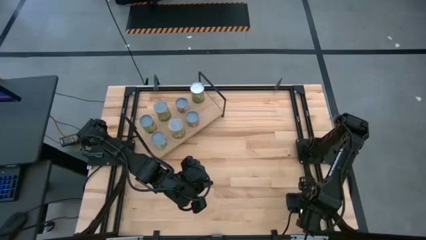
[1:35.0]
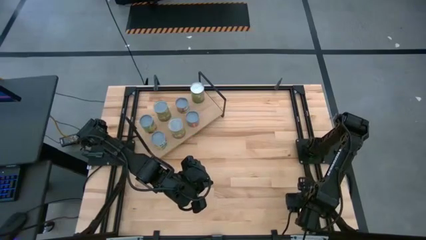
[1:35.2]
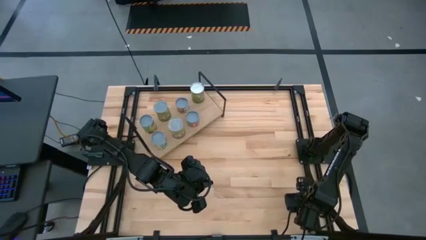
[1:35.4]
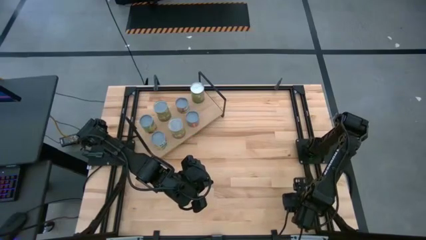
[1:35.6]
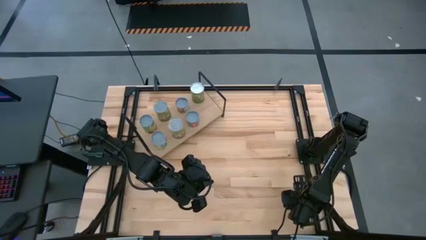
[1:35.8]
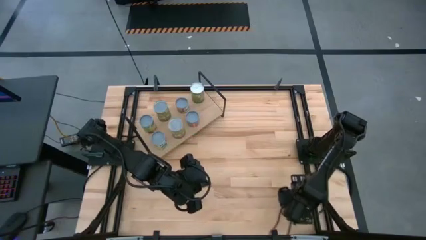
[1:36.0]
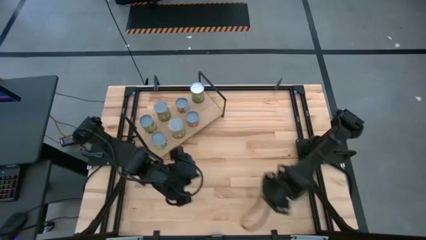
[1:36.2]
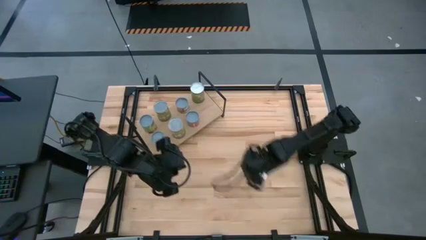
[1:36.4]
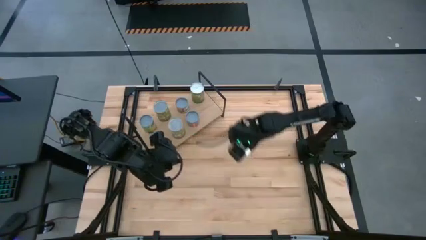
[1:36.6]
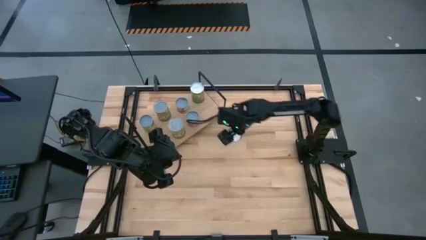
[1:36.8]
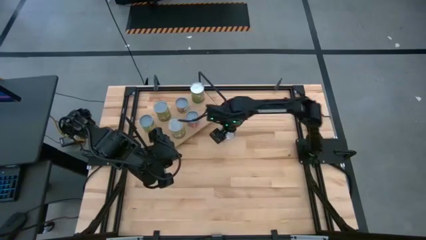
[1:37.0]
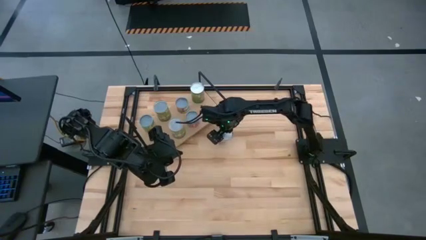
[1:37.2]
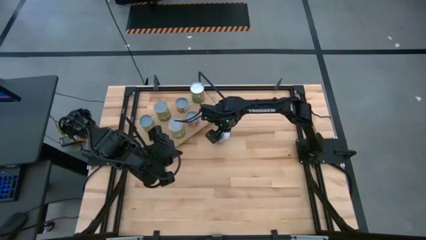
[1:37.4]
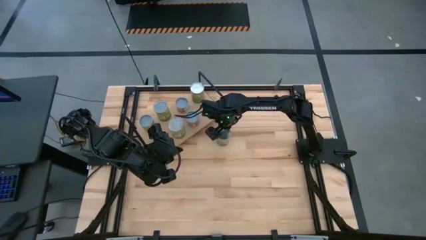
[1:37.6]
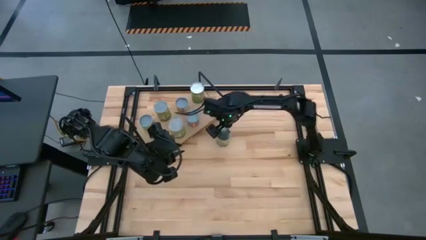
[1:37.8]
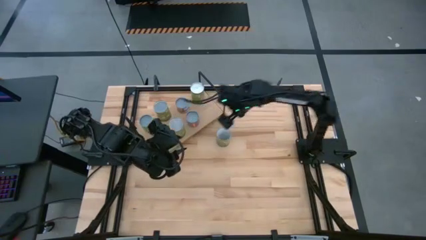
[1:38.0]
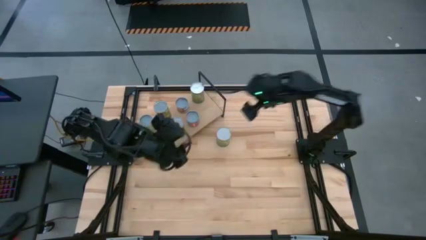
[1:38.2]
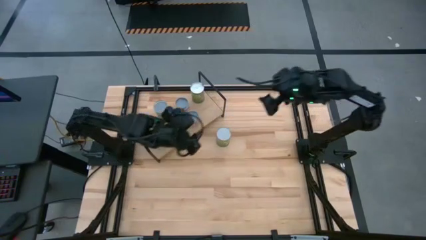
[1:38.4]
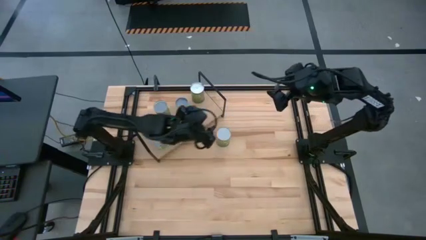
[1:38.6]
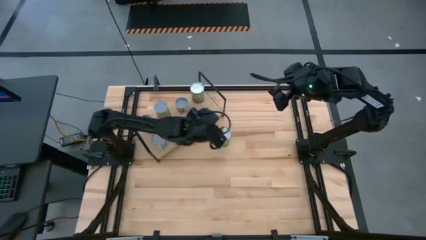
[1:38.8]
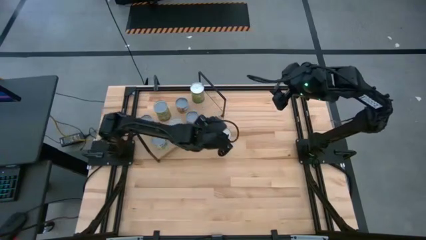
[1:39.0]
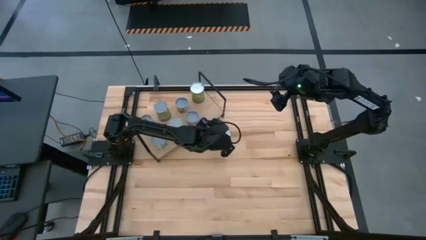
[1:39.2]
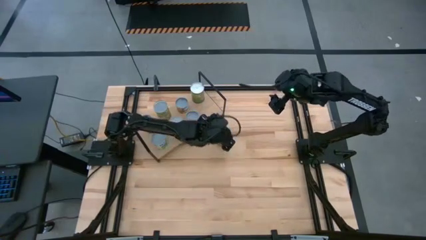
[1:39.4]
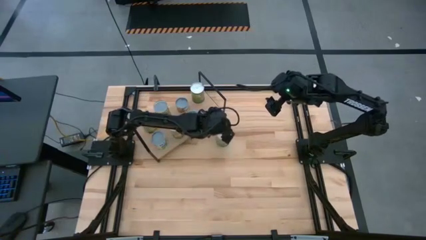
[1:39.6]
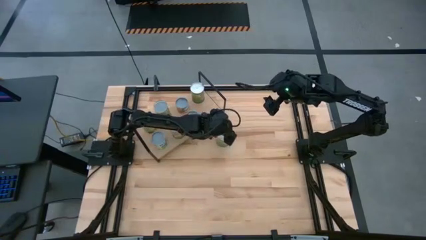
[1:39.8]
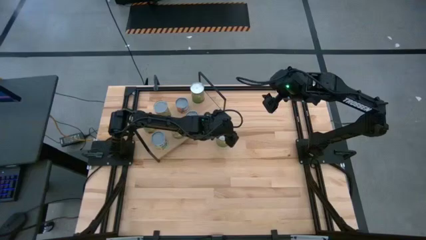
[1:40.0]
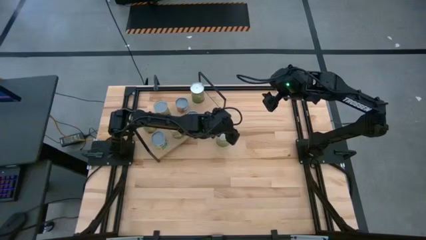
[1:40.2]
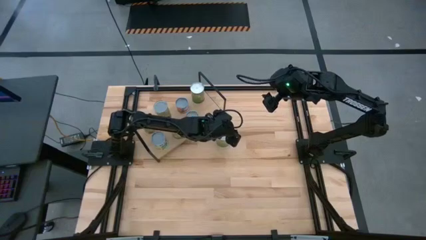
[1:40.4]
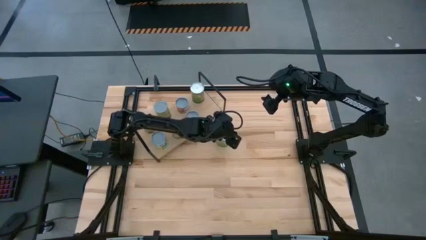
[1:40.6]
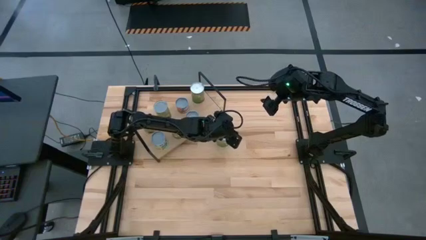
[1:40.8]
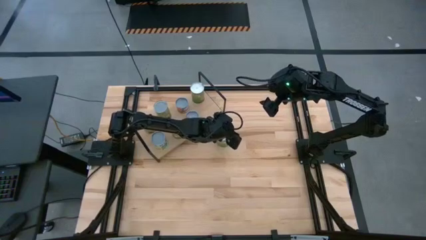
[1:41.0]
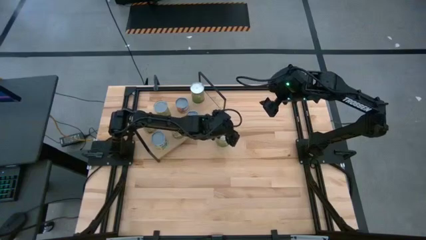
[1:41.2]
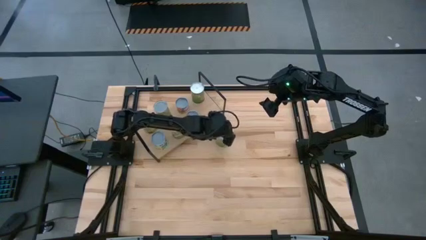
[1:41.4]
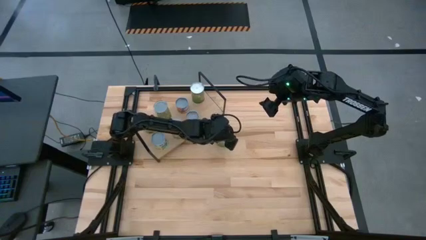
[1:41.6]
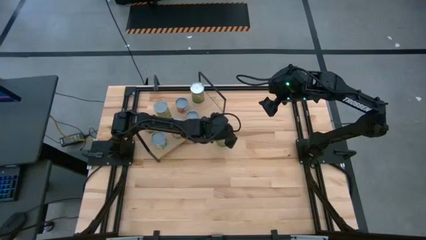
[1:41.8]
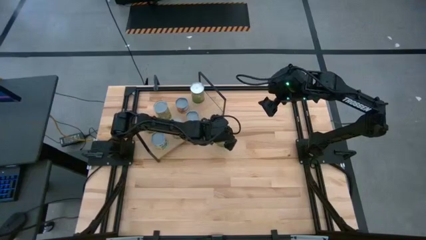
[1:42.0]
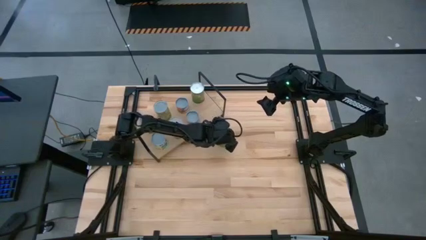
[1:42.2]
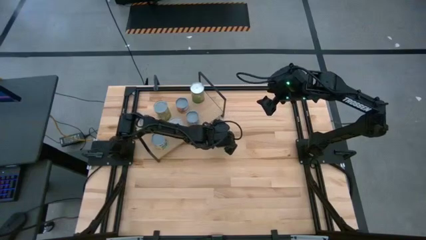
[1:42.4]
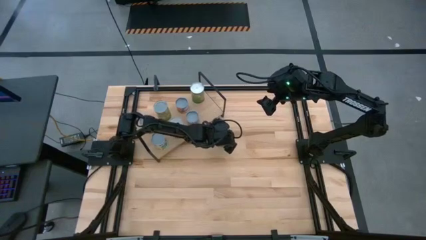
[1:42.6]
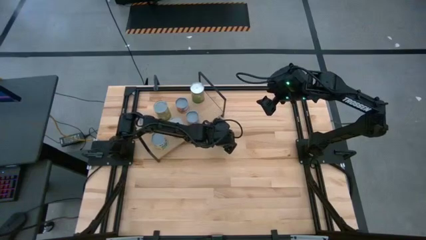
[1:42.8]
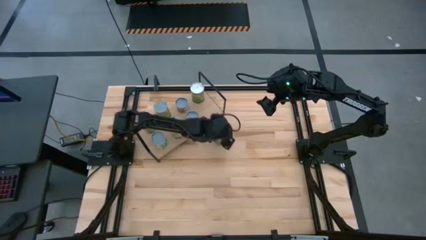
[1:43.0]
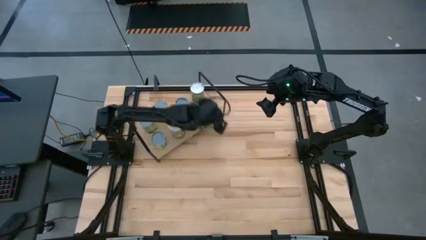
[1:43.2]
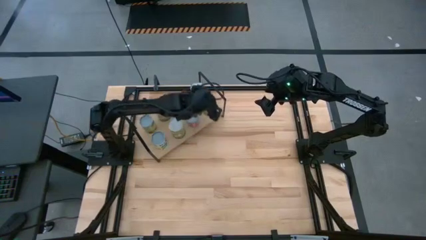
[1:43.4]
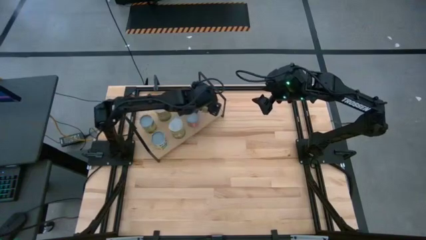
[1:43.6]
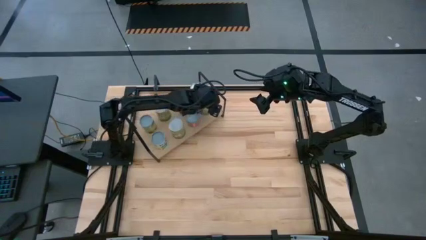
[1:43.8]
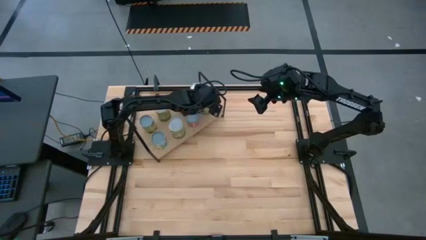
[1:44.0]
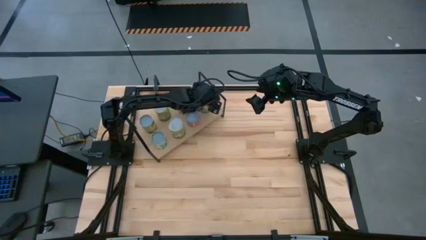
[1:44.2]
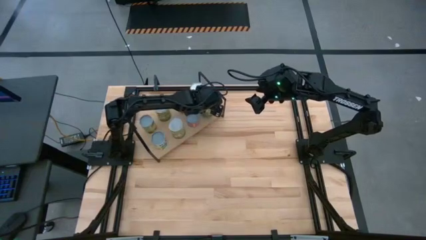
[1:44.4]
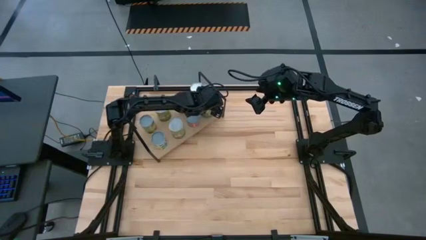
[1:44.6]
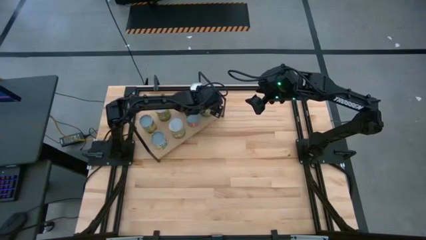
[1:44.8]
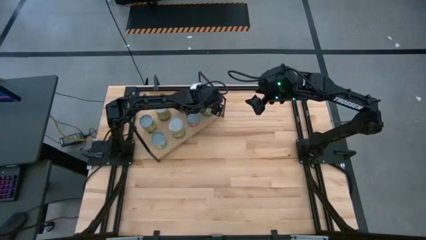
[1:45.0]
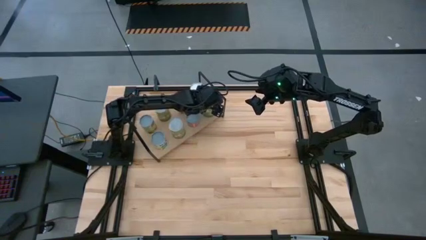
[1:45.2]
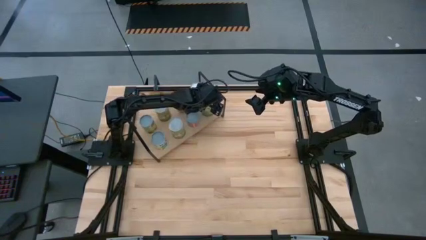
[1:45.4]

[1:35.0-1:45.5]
Task: Pick and place cans onto a shelf
Put the canned oranges on the shelf
